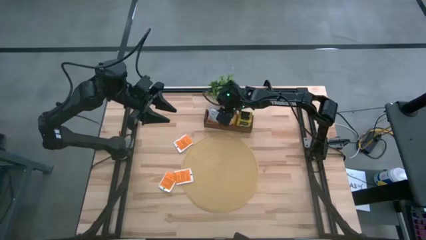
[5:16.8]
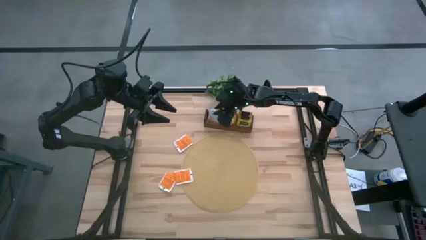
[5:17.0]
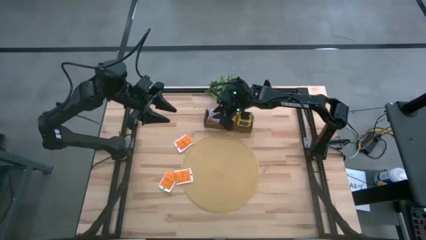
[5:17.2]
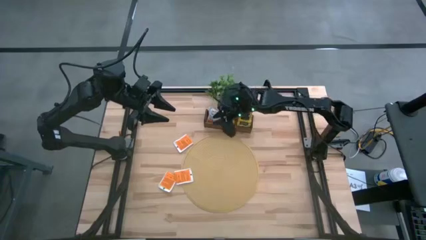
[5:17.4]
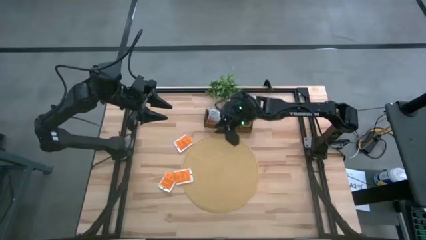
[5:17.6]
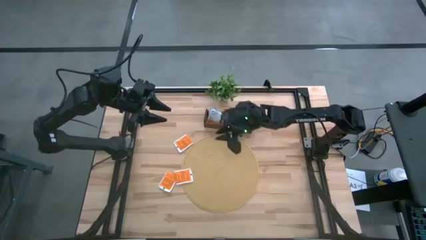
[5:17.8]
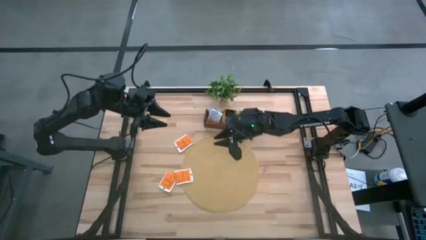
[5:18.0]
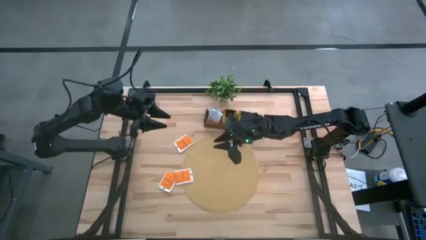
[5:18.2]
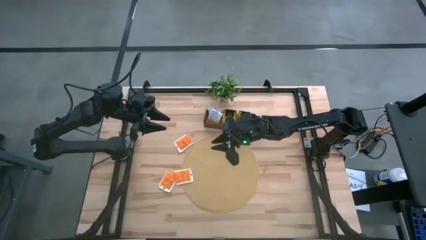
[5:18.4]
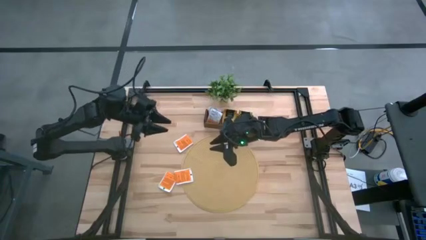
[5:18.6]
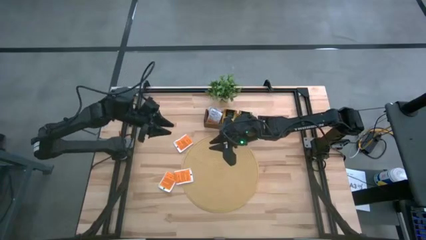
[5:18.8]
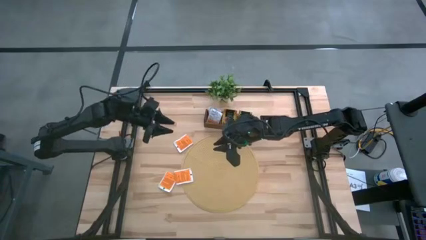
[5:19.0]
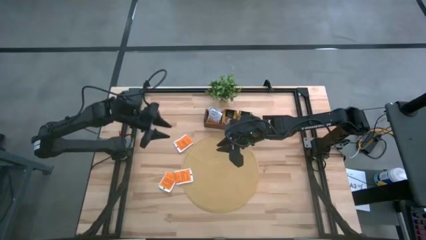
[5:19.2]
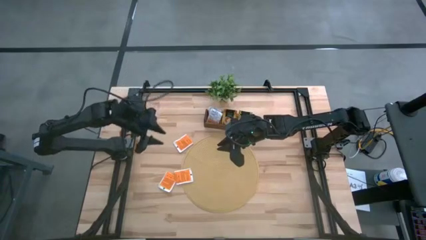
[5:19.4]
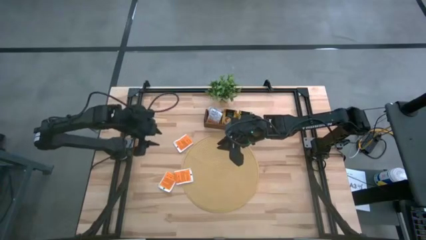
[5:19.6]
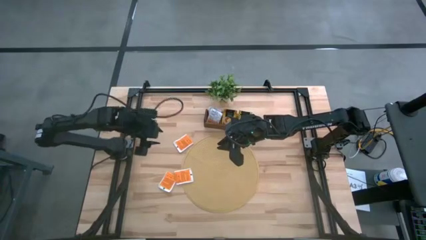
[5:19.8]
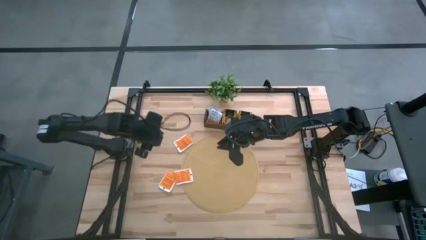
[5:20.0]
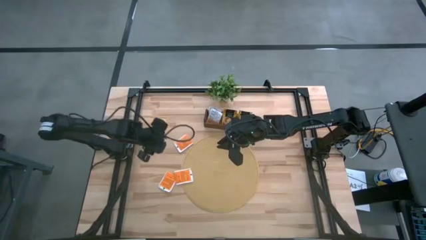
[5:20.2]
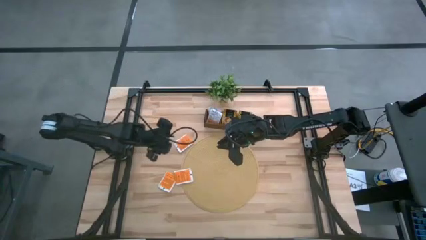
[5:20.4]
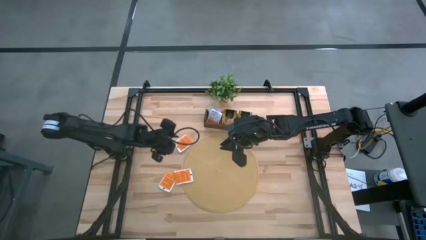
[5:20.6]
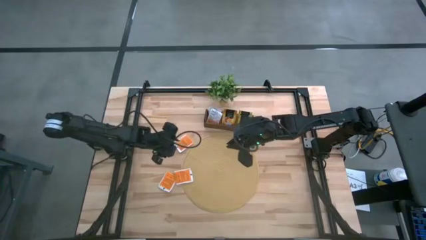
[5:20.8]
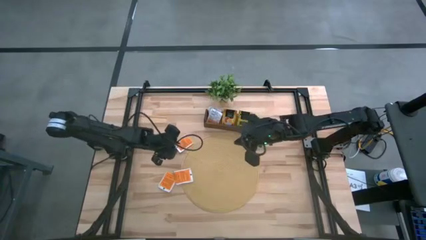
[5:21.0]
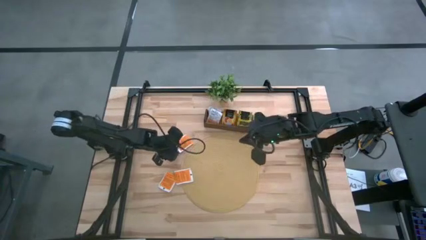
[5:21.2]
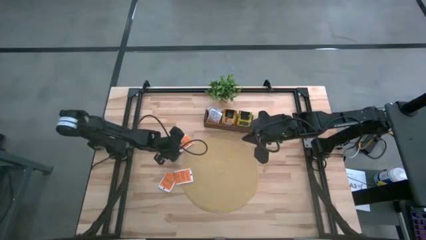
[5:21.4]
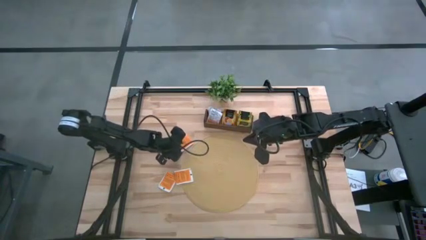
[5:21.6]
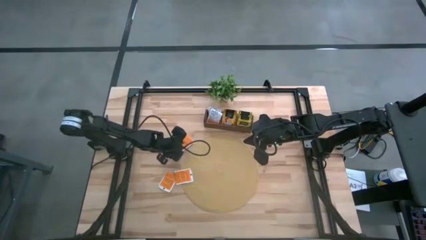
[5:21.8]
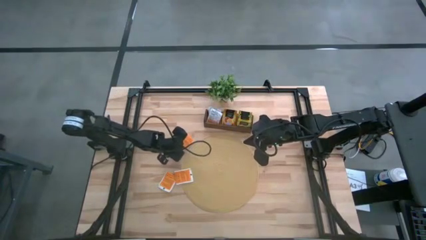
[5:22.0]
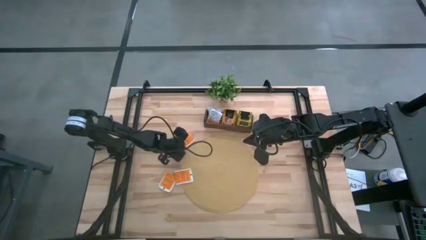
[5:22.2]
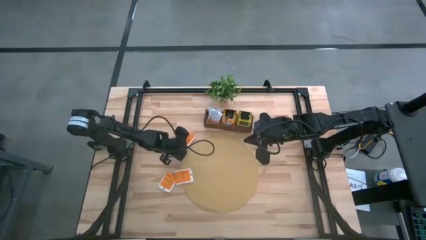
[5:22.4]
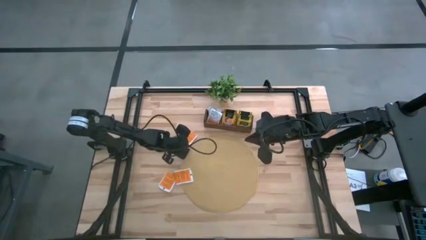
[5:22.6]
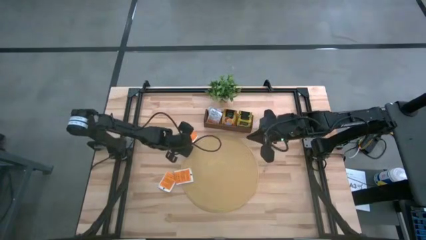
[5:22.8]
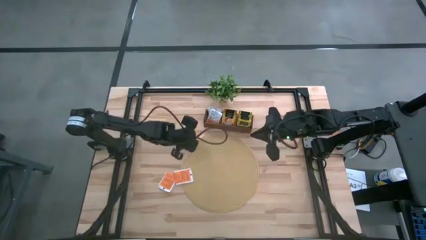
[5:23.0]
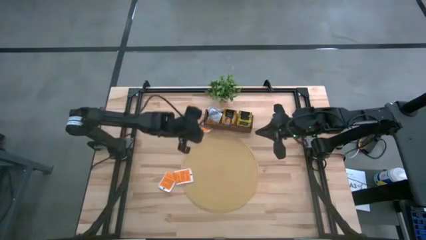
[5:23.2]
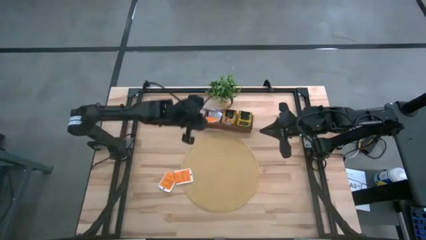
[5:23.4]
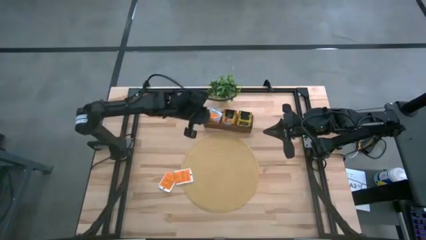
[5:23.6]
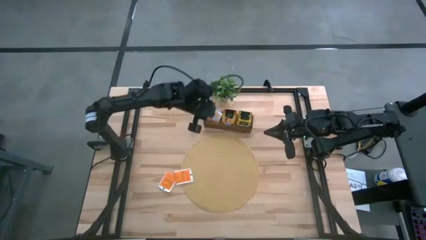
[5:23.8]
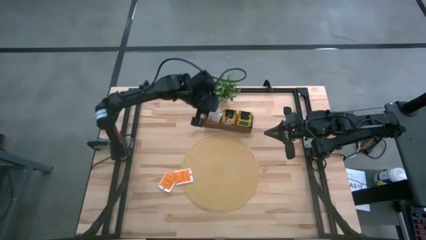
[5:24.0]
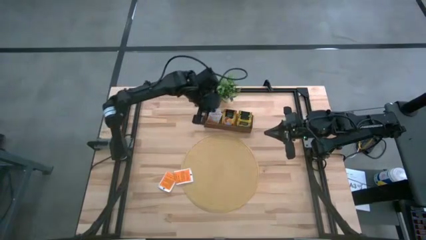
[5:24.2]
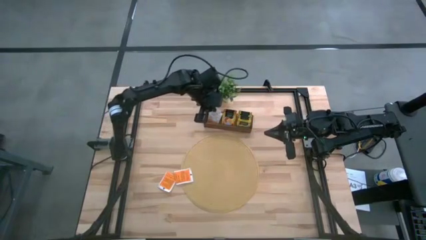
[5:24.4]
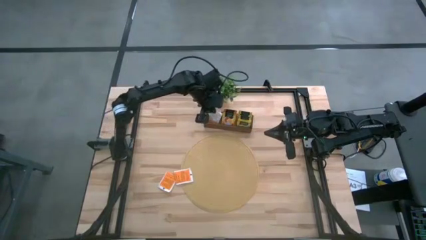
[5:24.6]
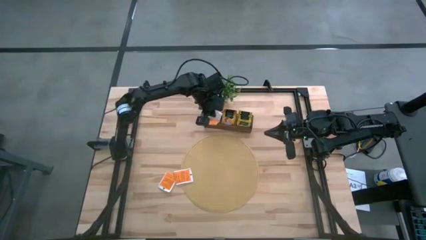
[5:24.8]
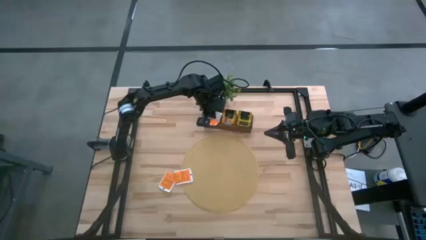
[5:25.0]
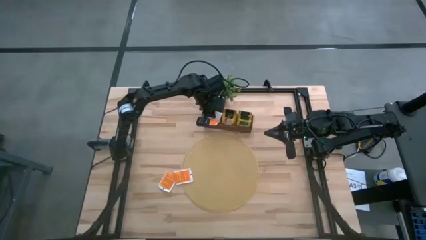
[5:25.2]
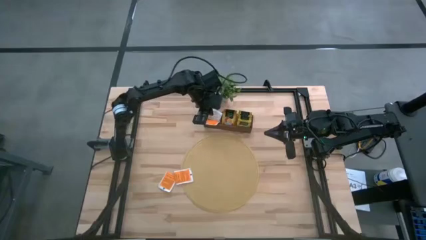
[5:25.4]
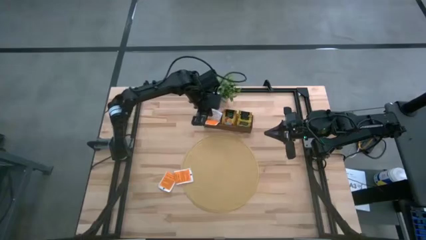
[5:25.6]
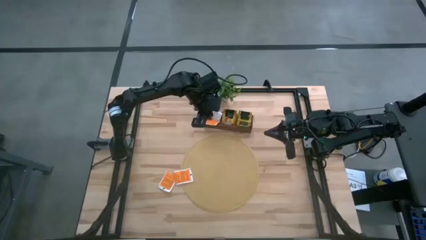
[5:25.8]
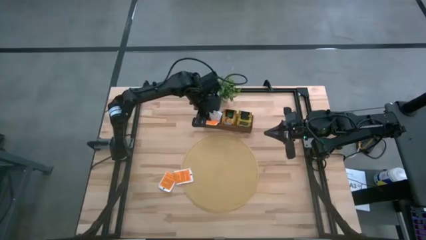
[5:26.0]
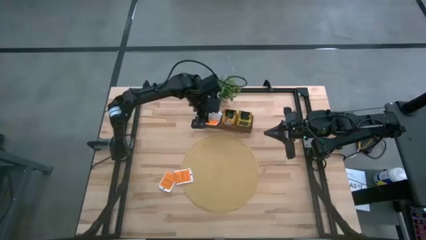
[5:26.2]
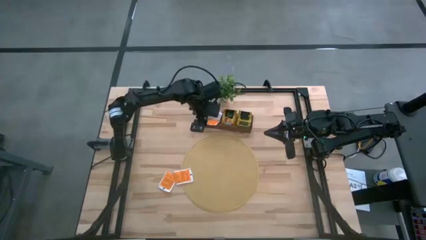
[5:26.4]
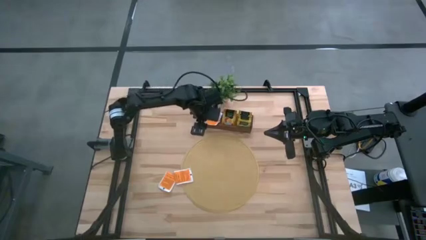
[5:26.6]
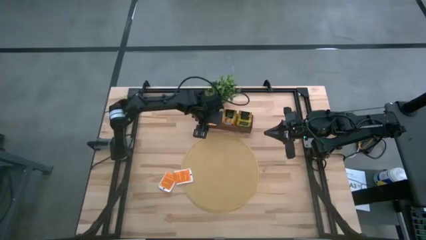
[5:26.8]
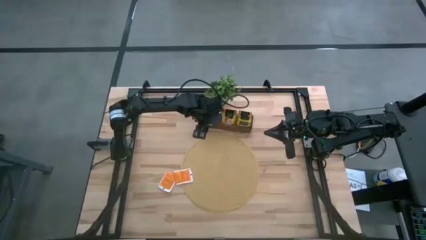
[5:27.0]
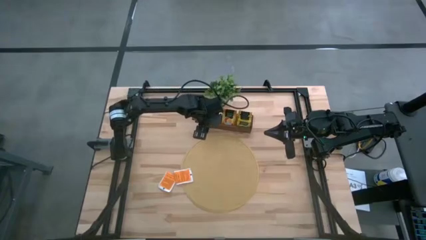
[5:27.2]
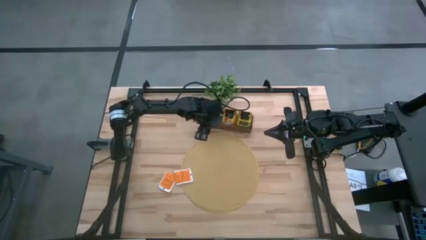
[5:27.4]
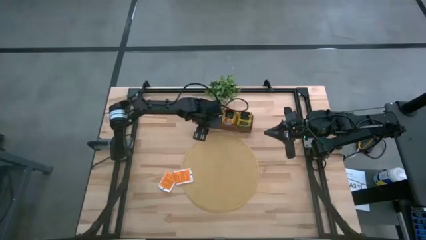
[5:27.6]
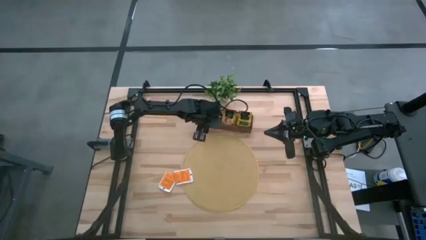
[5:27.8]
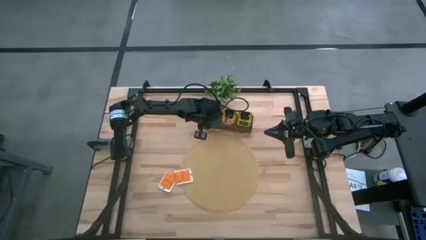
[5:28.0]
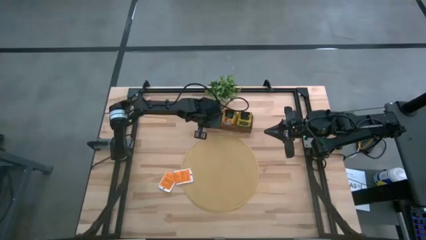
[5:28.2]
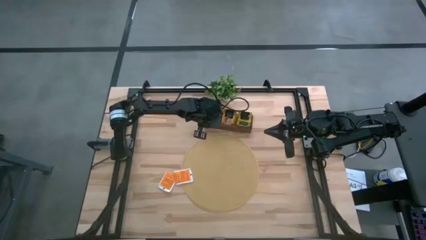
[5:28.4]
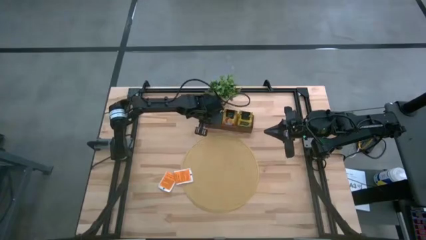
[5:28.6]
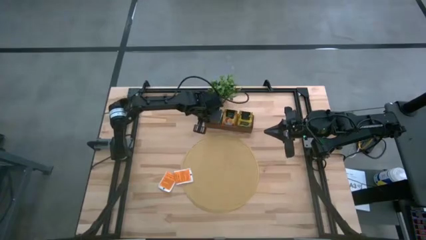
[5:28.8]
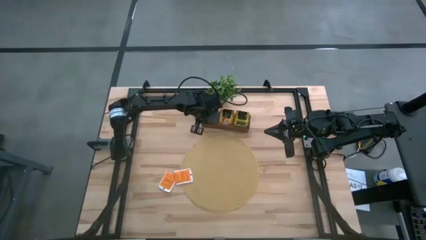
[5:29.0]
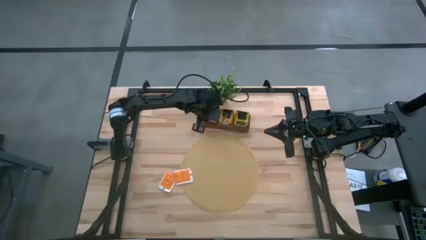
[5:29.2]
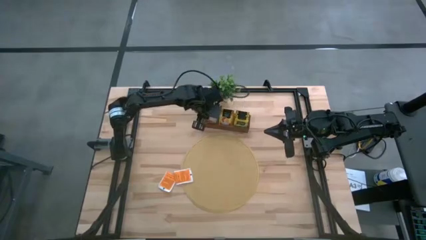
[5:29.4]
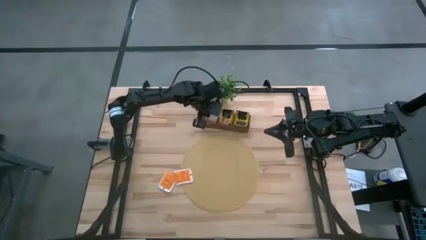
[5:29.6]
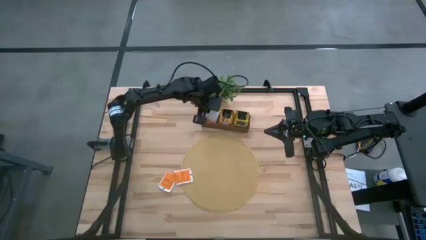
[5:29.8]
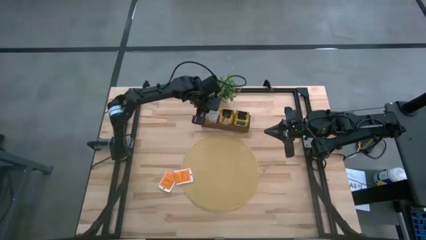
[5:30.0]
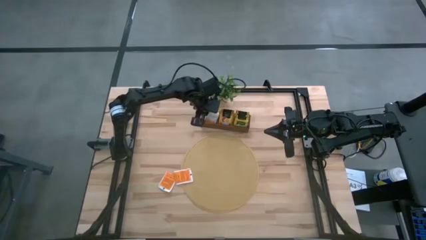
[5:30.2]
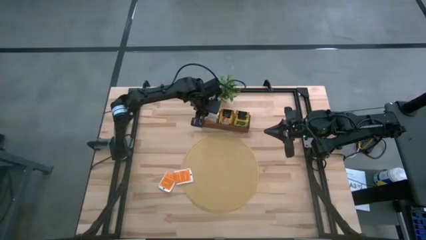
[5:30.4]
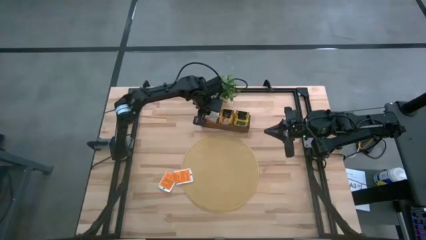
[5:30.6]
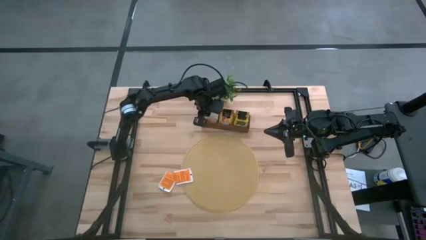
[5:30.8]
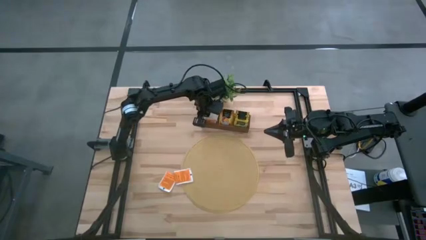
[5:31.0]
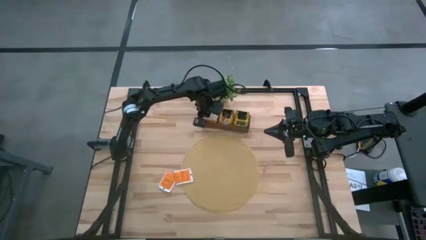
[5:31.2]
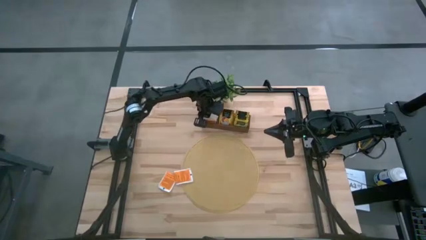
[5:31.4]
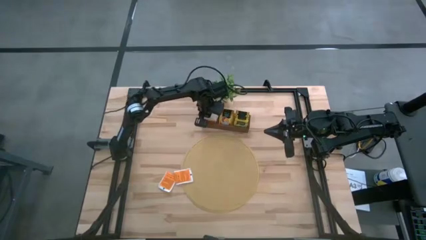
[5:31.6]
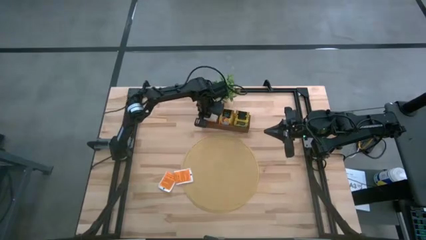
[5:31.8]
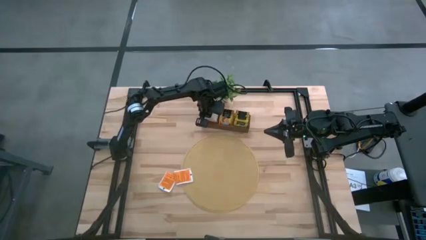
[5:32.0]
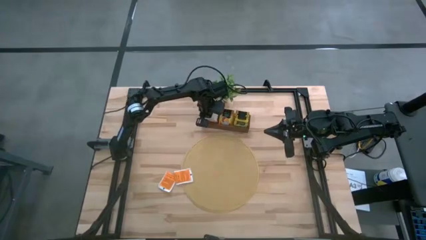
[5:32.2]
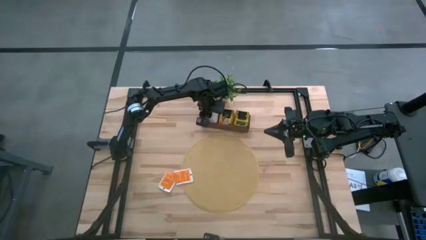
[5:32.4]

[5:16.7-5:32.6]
Task: Pick & Place Tea
Put the white tea bag into the left section of the wooden organizer

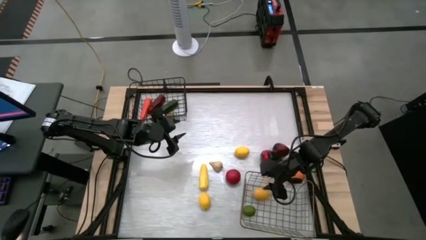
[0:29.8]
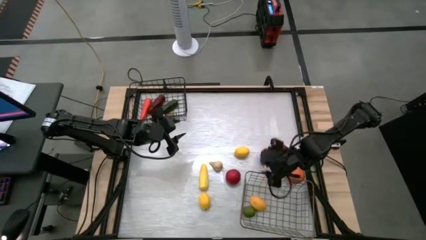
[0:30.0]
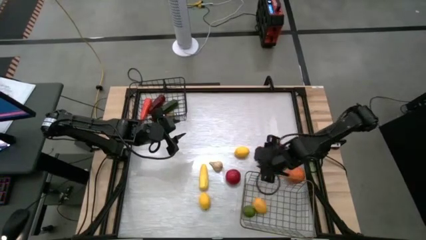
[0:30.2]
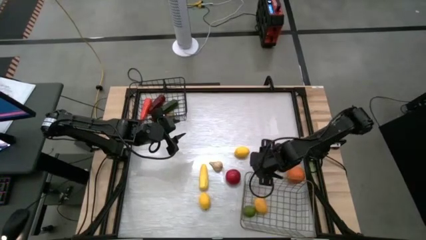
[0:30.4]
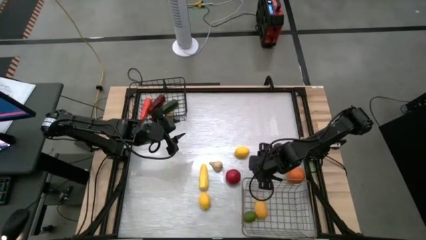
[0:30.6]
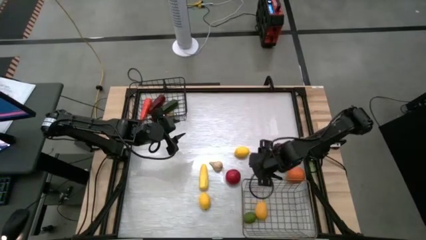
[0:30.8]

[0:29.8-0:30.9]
Task: Sort produce into baskets
Adjust the gold wire basket

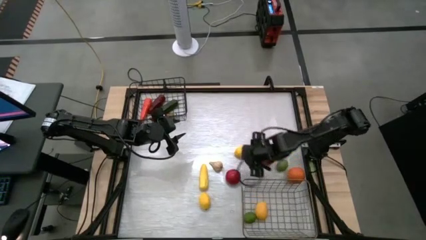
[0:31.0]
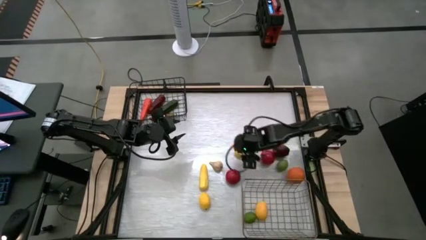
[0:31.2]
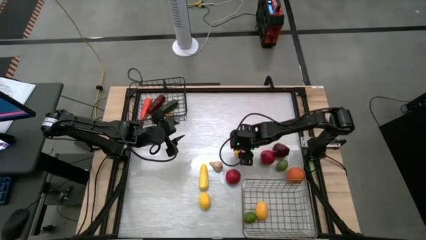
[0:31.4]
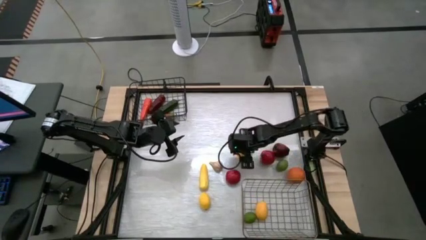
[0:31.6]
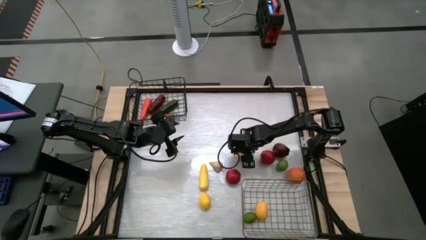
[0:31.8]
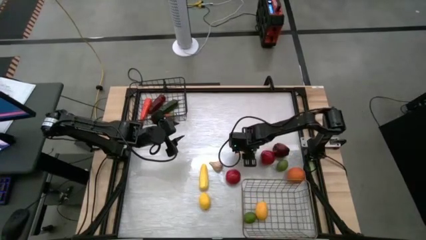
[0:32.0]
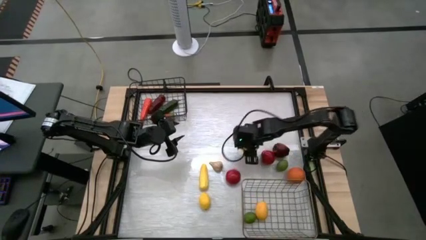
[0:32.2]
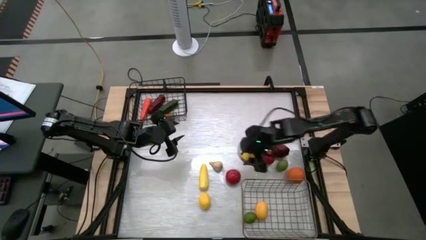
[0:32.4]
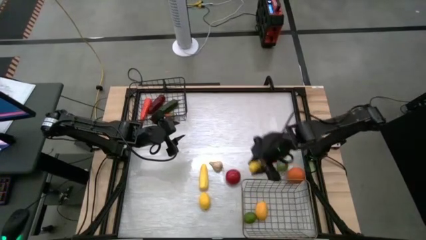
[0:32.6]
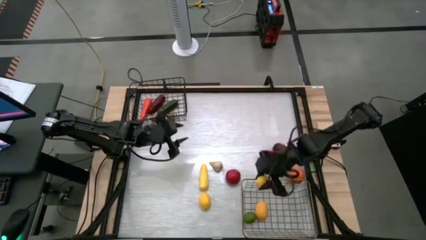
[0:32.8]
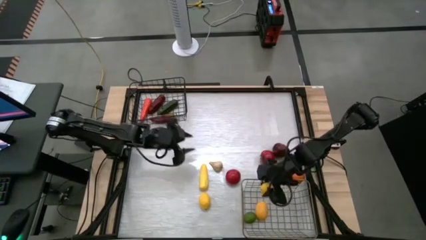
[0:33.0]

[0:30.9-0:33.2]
Put the top lemon into the gold wire basket
